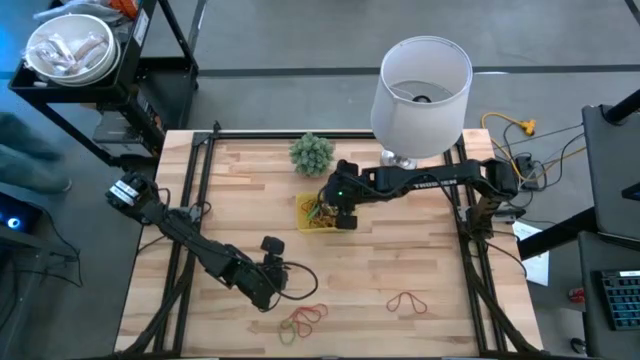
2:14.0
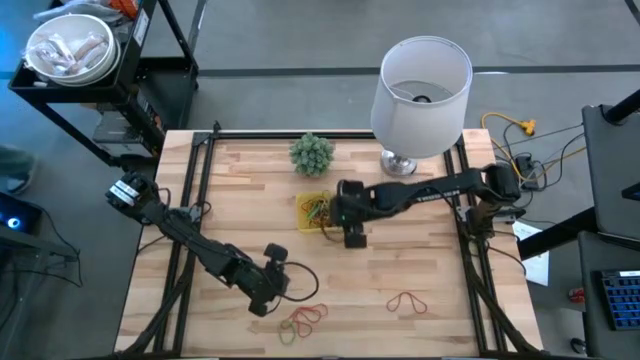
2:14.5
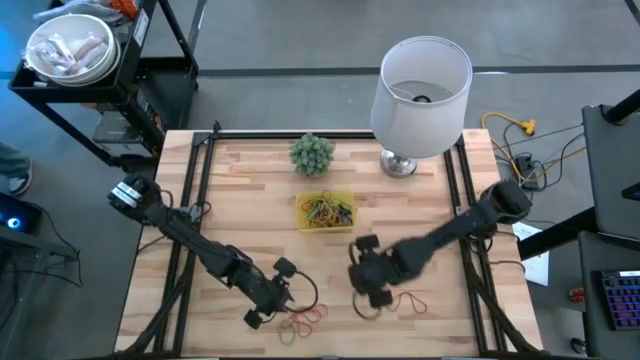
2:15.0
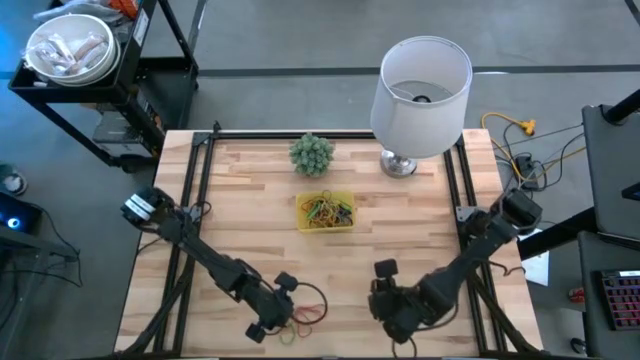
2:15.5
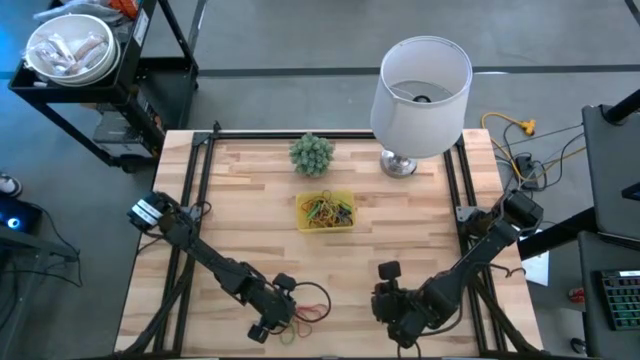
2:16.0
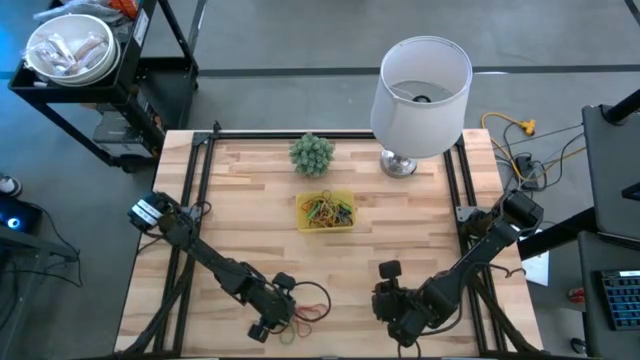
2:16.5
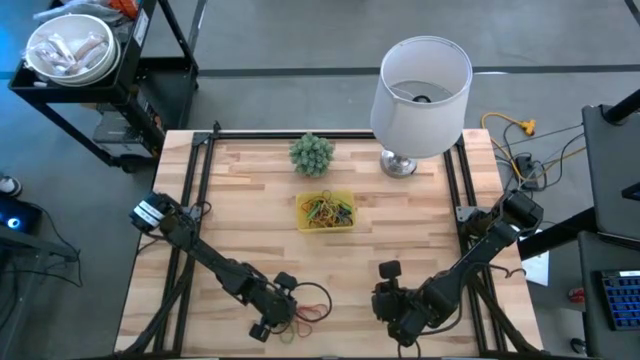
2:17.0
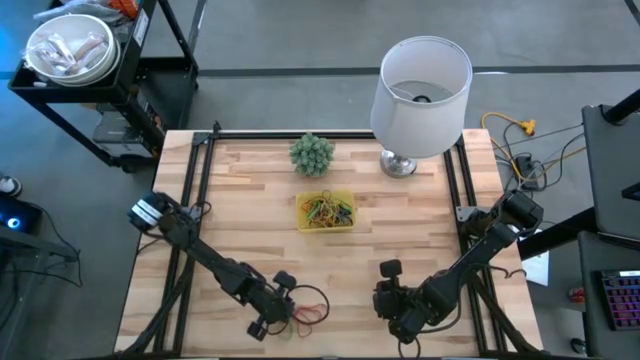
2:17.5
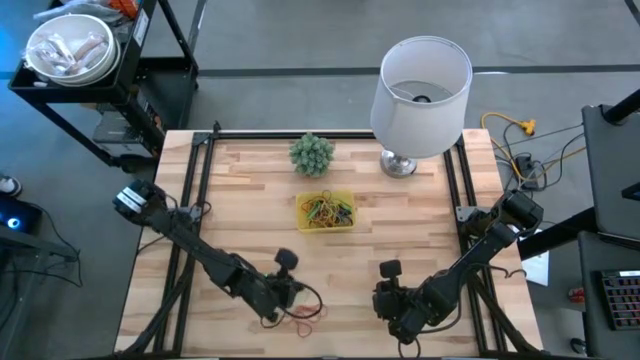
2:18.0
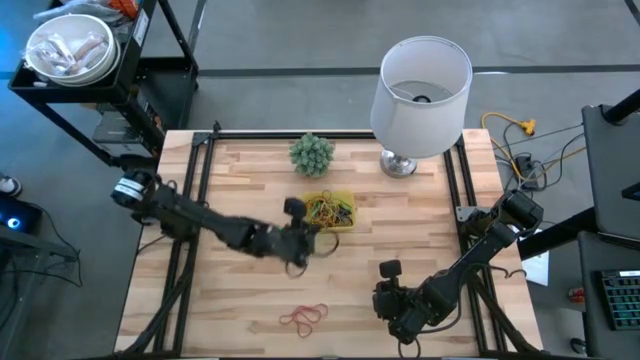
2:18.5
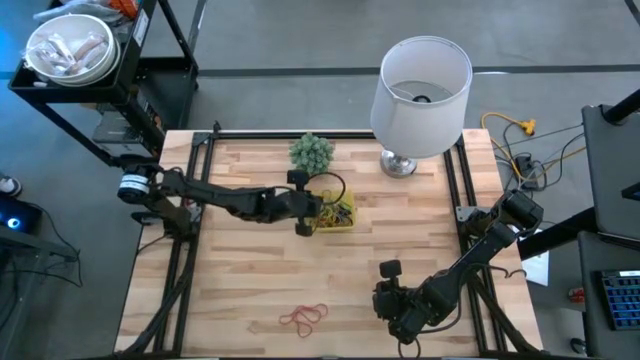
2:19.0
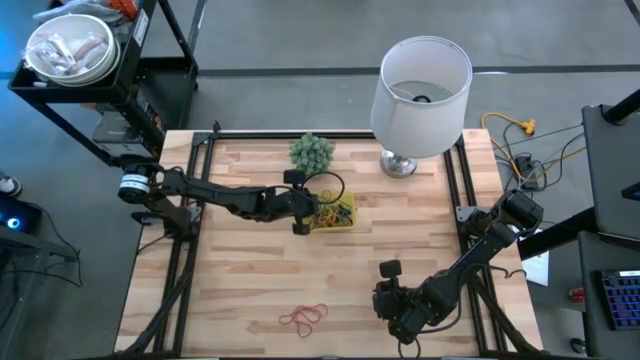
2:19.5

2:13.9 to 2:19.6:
Task: Pick and place rubber bands into bin
Put the green rubber band into the yellow bin

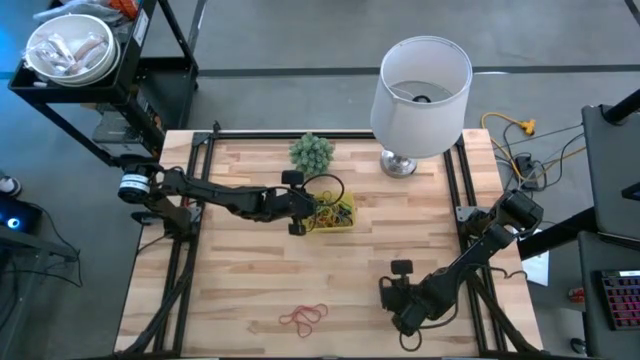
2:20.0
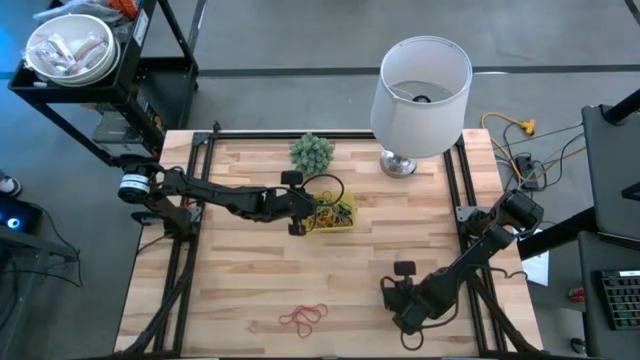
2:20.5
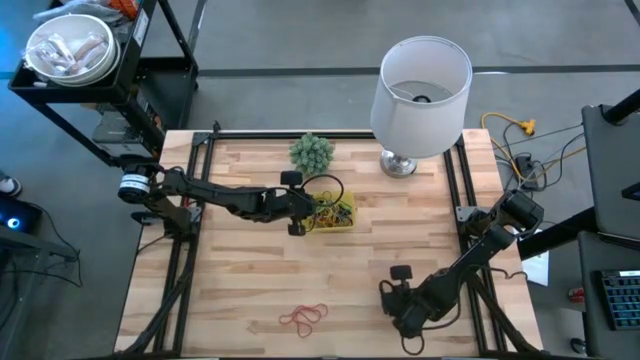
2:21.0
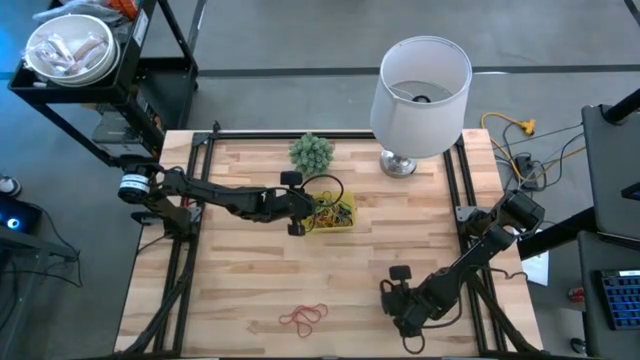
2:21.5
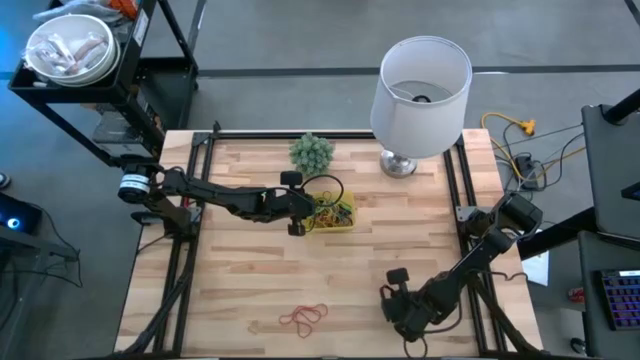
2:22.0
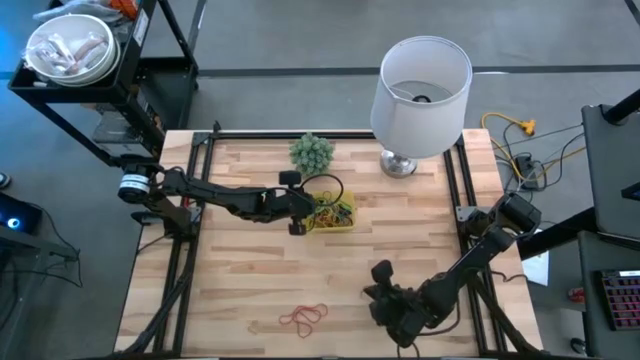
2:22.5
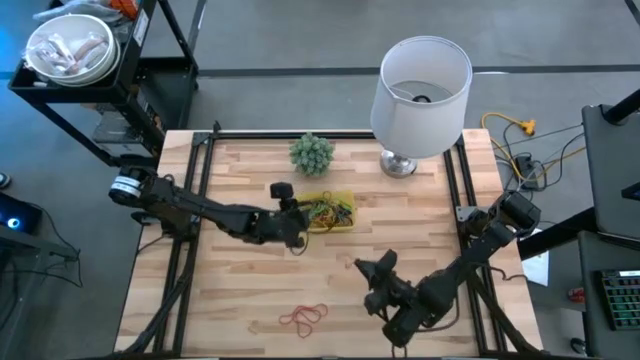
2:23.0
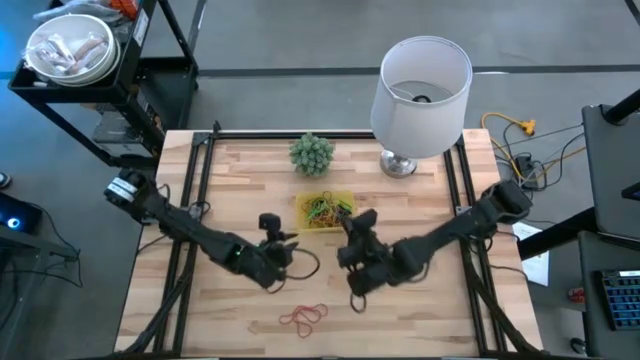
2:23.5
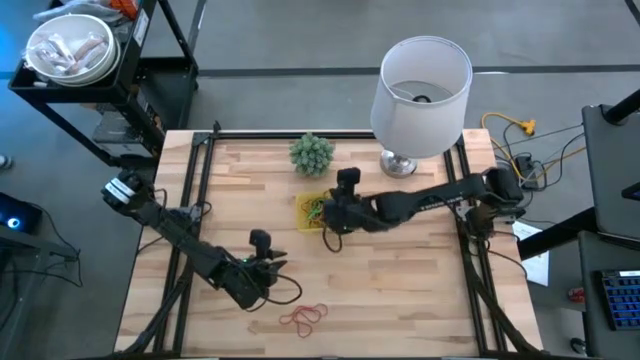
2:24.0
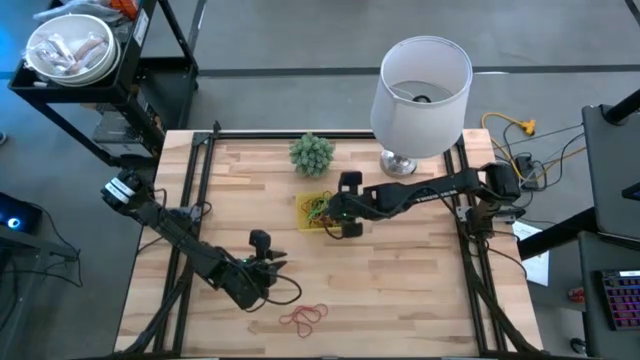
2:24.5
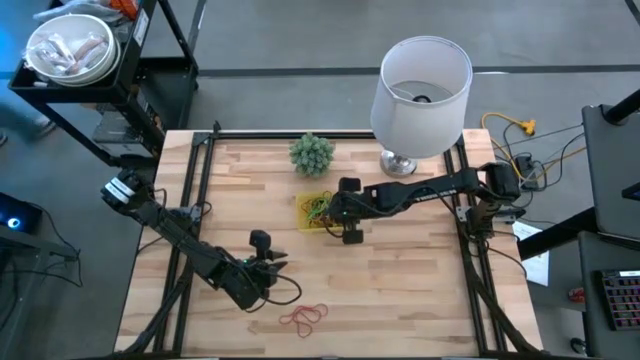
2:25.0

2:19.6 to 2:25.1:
Put the red rubber band into the yellow bin

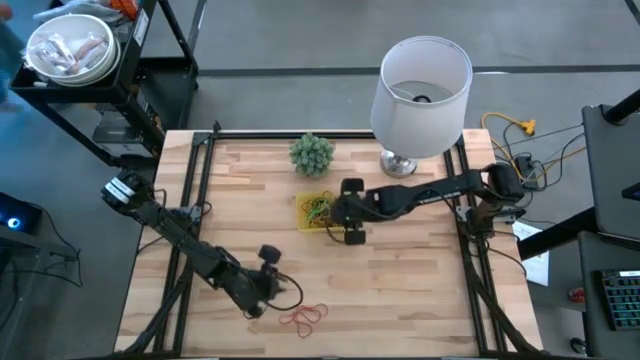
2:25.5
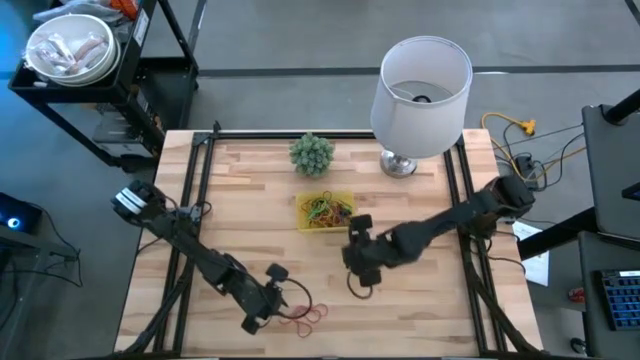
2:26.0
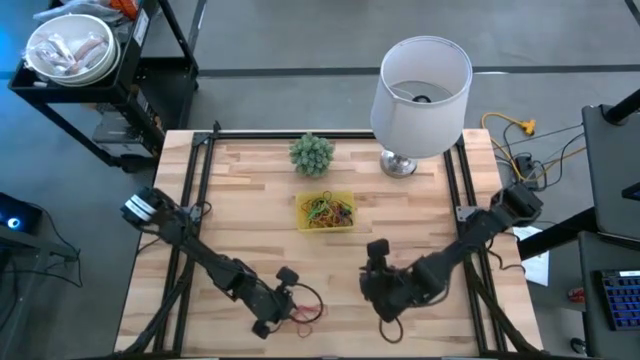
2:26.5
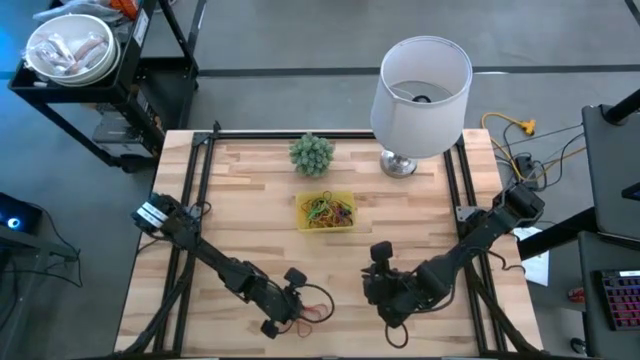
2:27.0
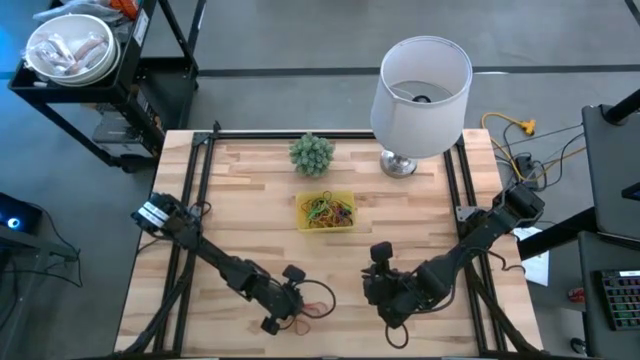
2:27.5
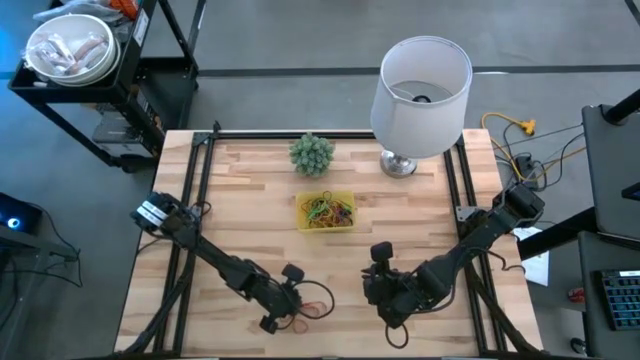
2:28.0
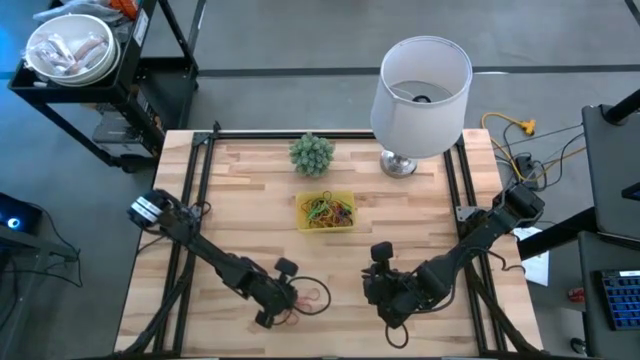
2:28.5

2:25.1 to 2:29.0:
Put the red rubber band into the yellow bin

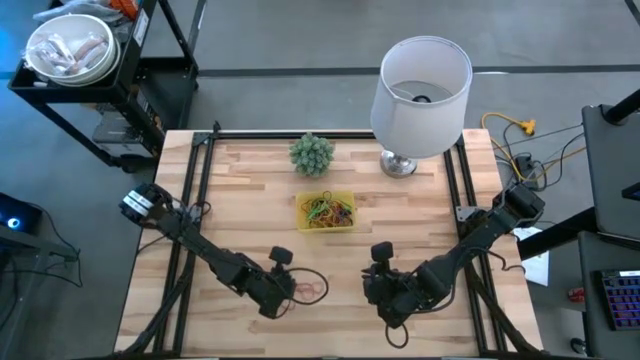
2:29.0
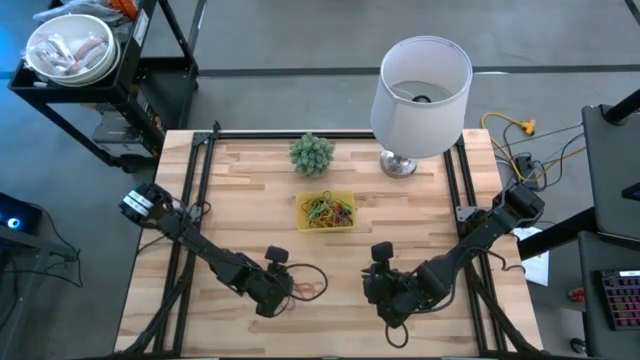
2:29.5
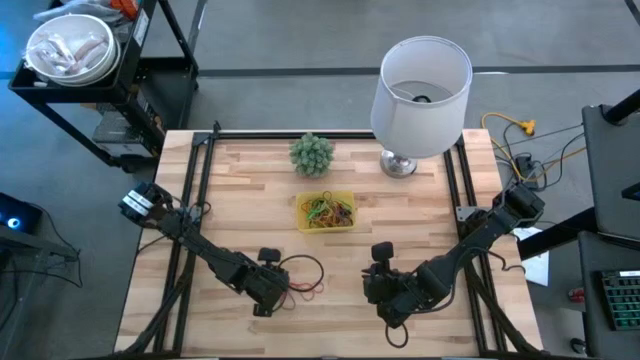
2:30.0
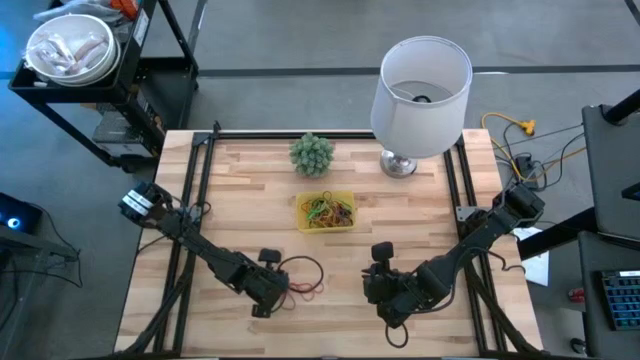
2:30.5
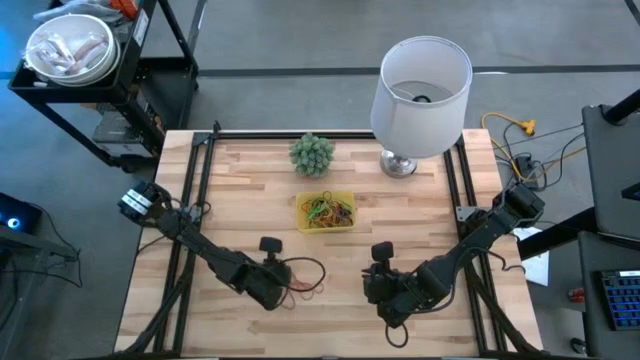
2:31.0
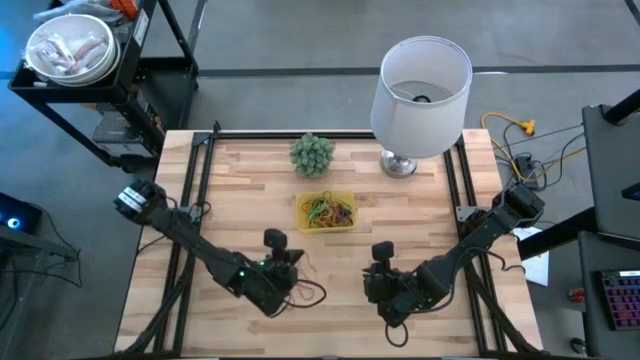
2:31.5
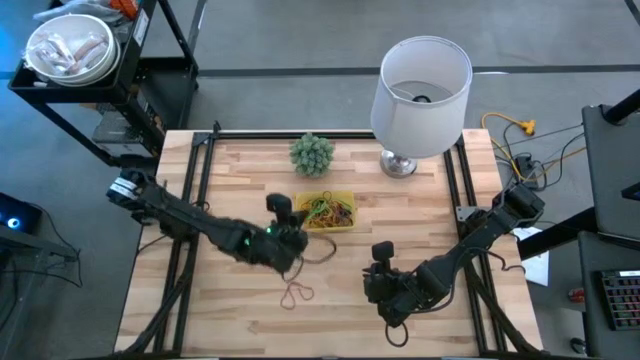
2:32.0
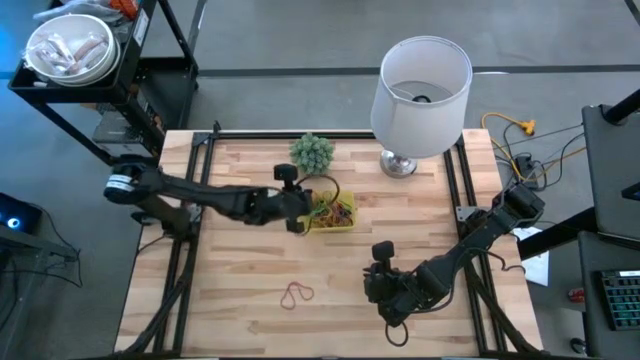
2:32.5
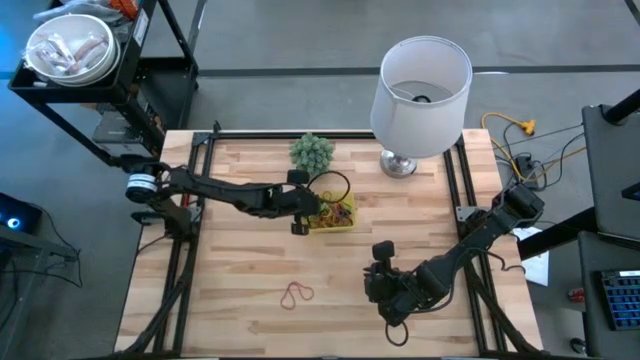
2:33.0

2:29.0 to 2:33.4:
Put the red rubber band into the yellow bin

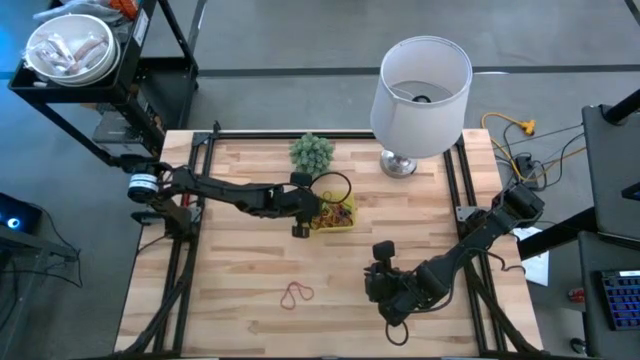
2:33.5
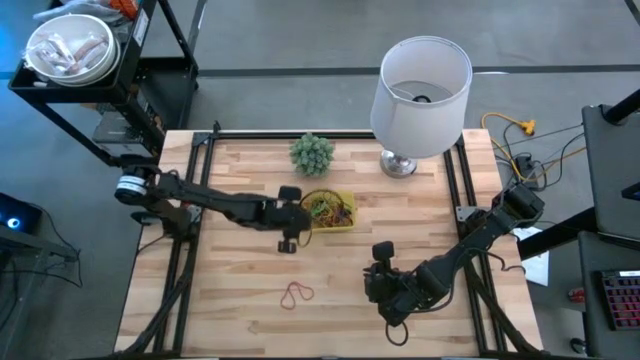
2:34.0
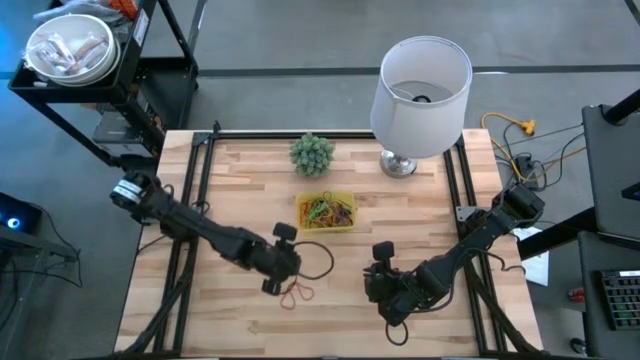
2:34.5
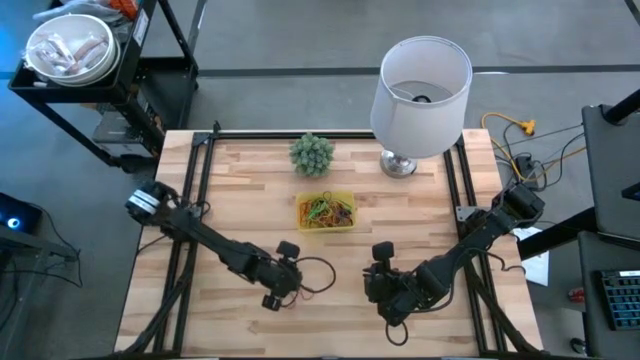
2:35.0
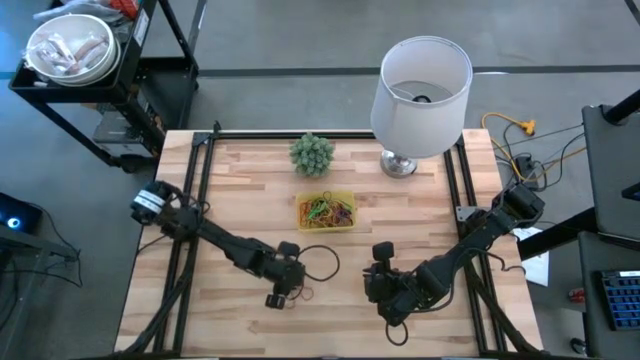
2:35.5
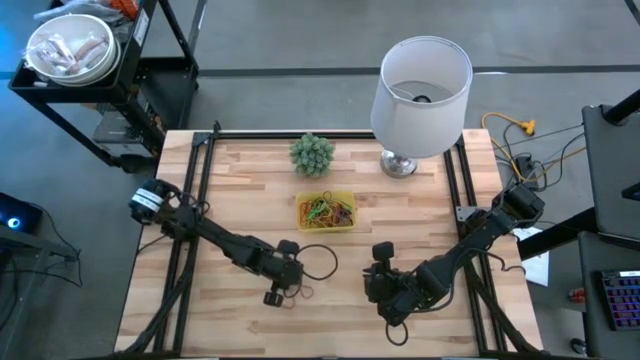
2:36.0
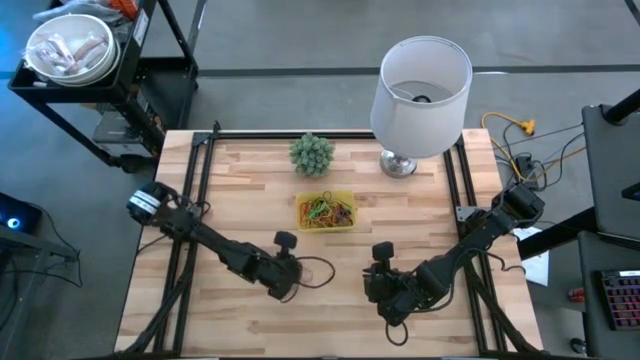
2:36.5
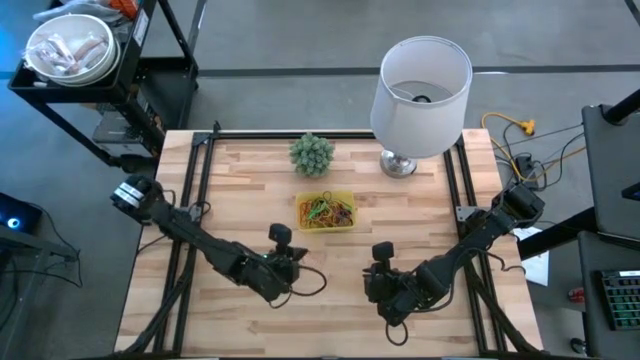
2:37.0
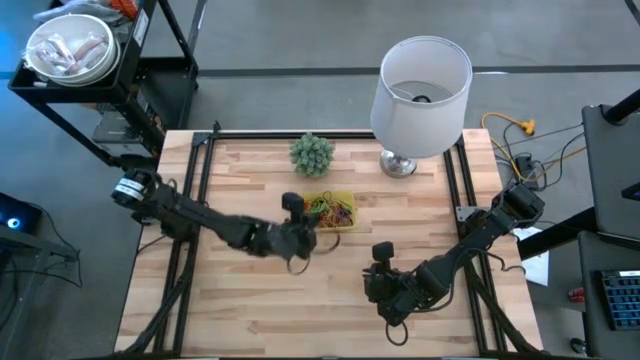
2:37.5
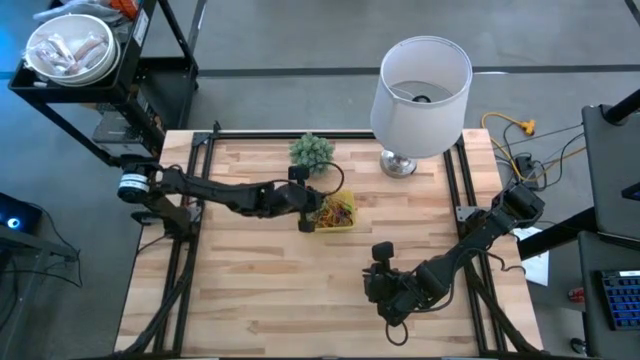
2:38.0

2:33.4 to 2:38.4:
Put the red rubber band into the yellow bin
